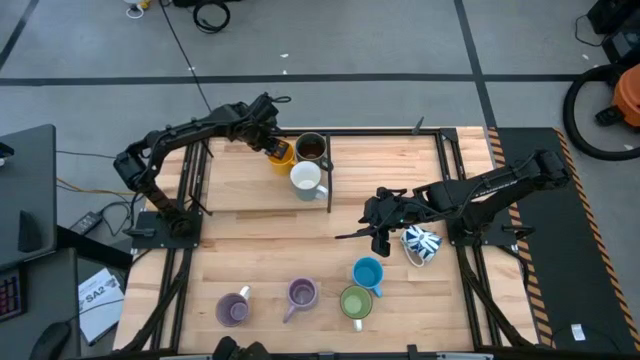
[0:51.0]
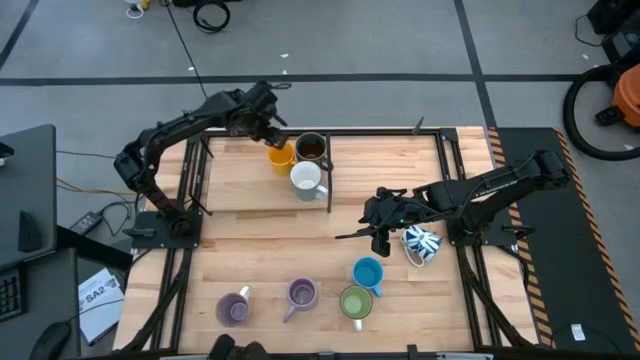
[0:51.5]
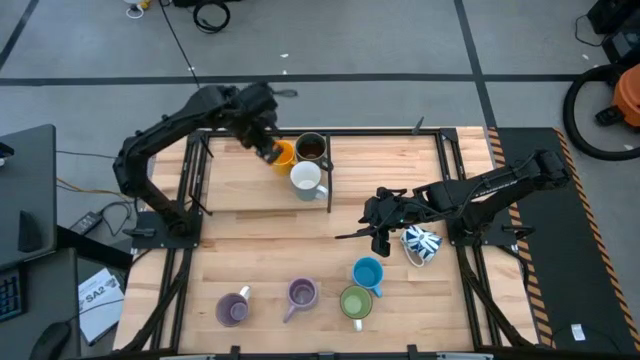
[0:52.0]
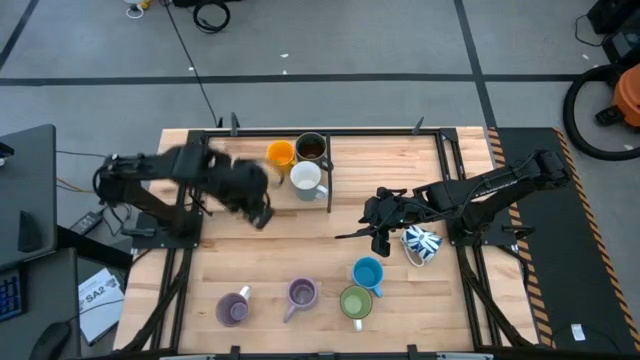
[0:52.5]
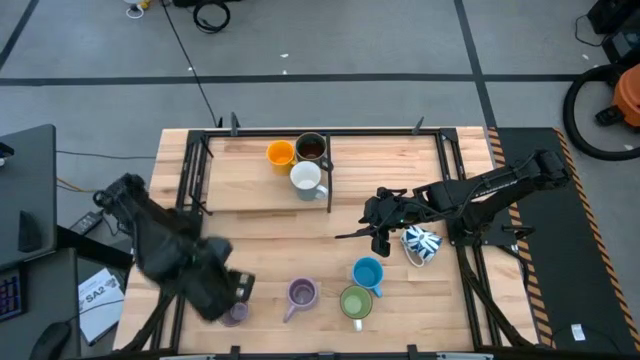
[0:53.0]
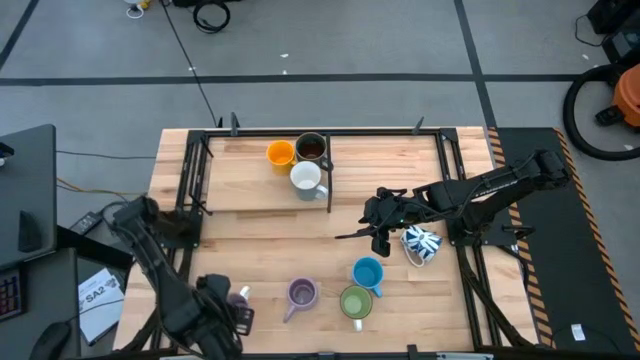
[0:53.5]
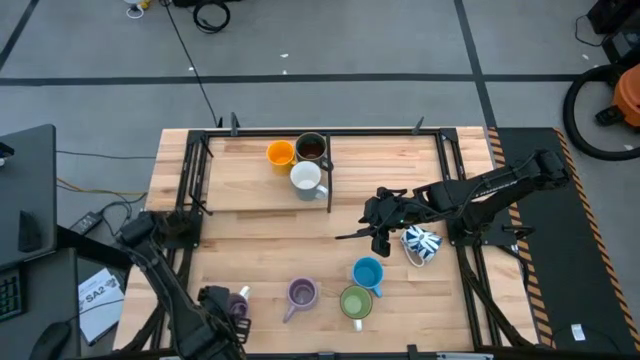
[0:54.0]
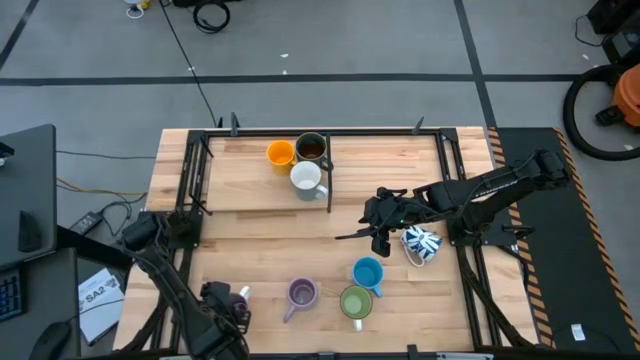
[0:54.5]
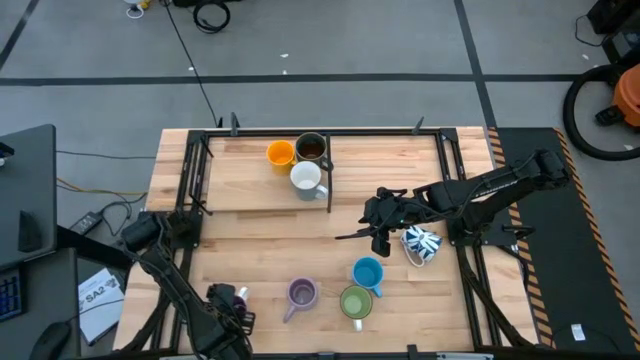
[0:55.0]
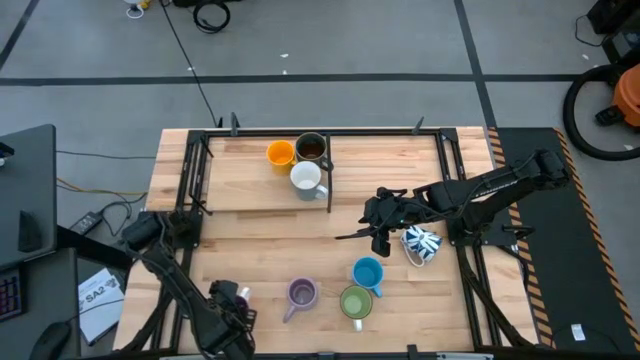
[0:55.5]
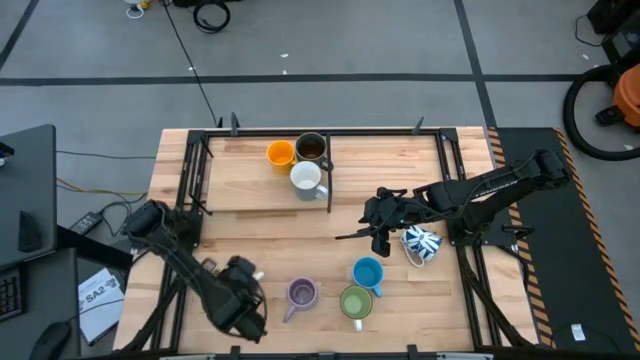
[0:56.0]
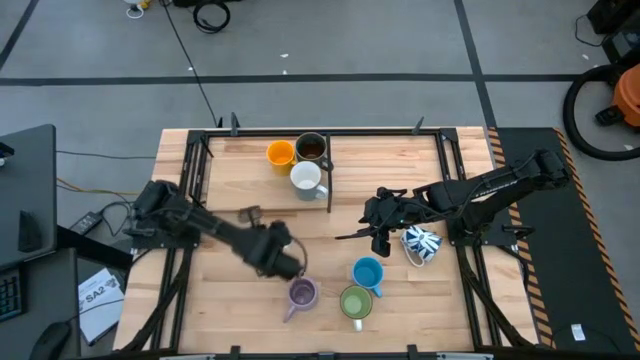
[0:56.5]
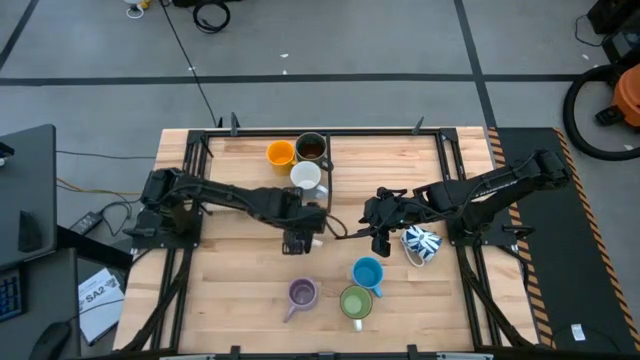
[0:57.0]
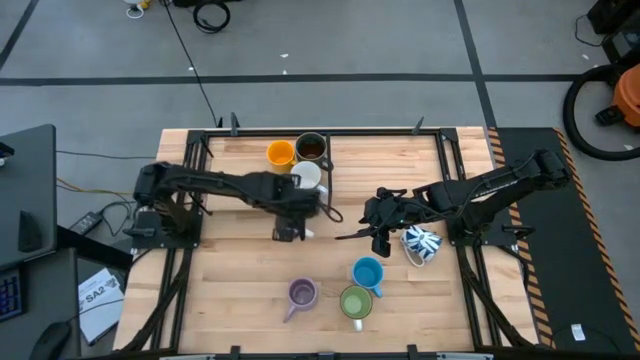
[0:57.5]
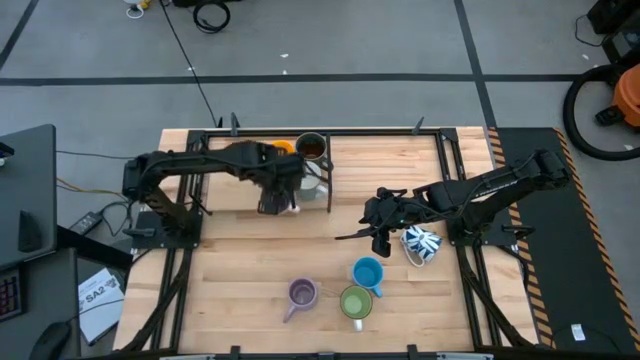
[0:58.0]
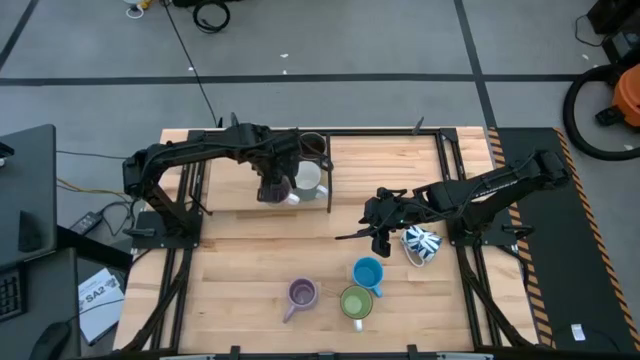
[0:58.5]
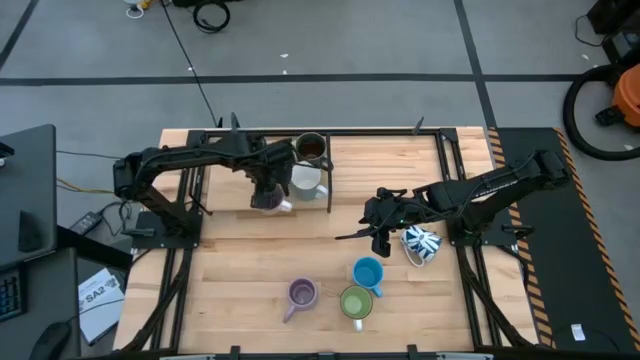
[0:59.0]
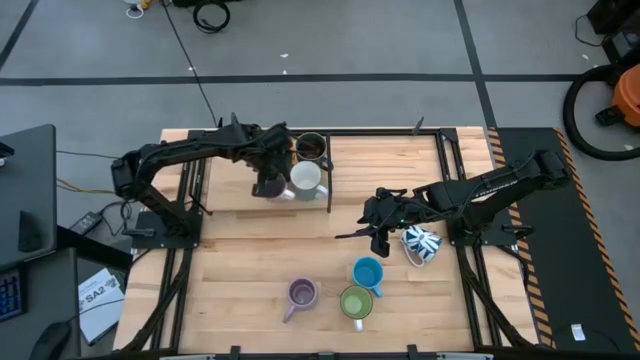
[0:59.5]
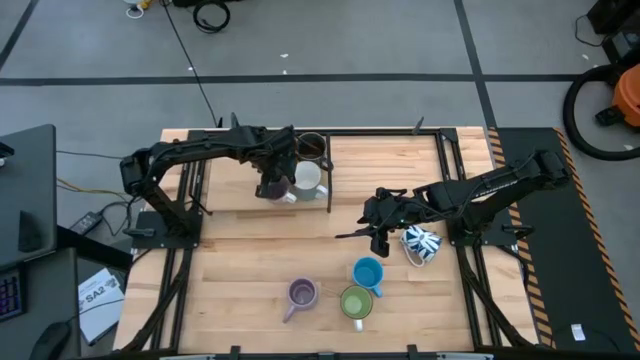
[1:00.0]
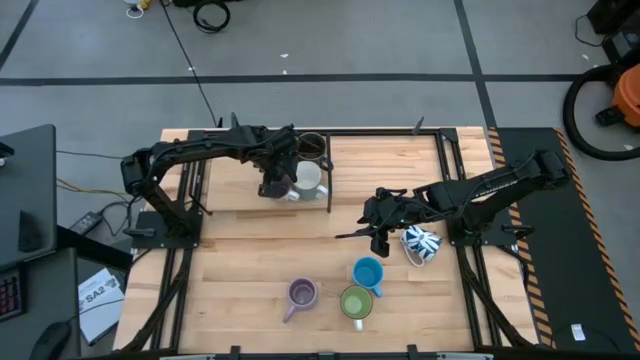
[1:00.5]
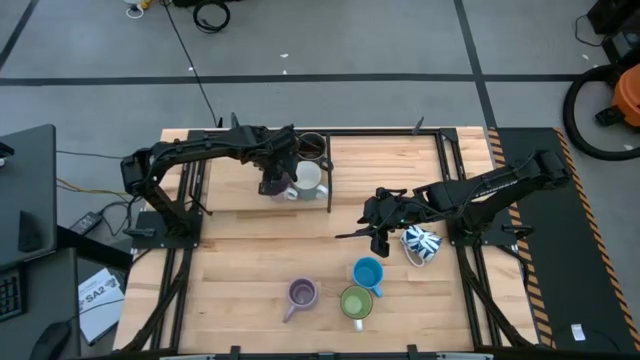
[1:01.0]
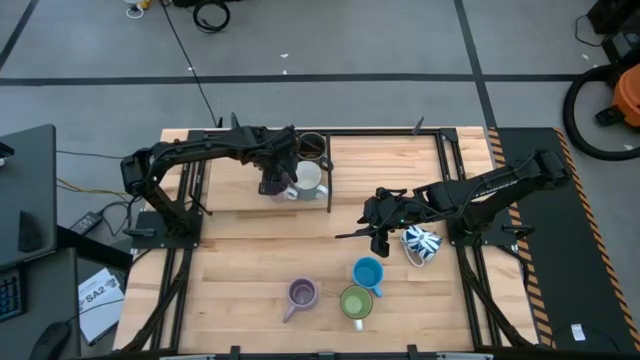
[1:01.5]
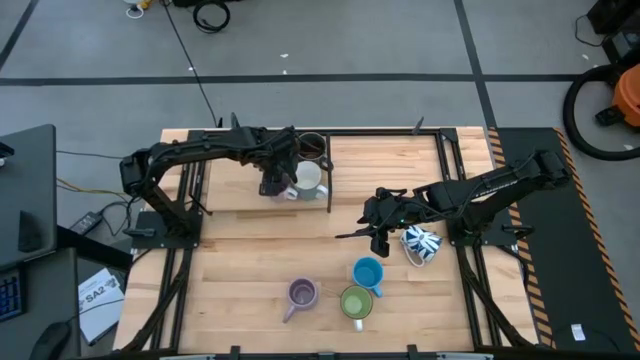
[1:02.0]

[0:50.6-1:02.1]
Task: Place coffee mugs
Put the purple mug on the left shelf

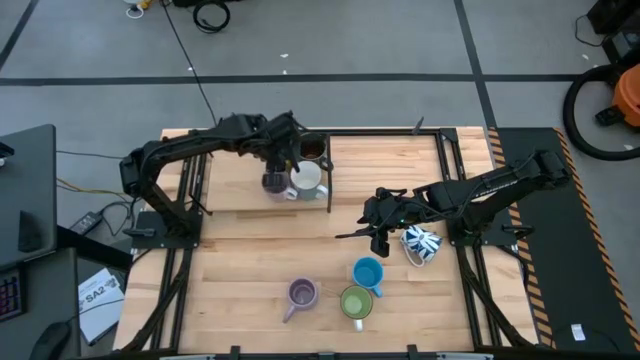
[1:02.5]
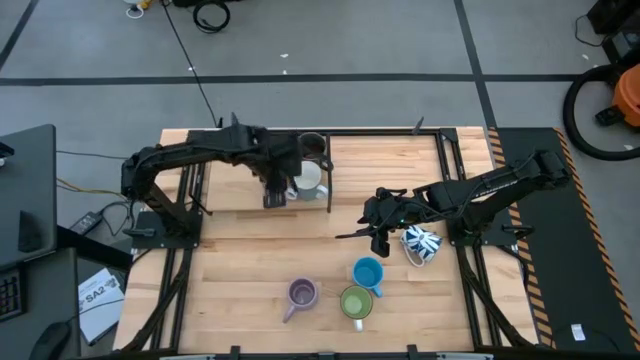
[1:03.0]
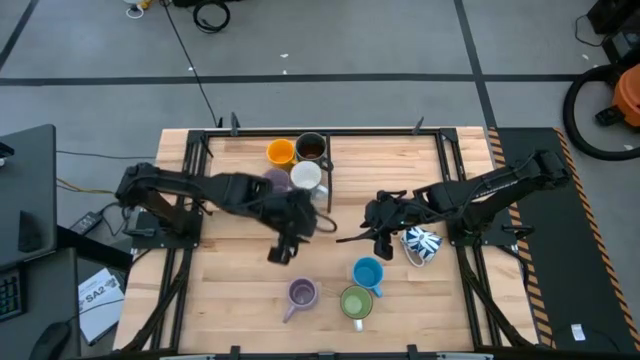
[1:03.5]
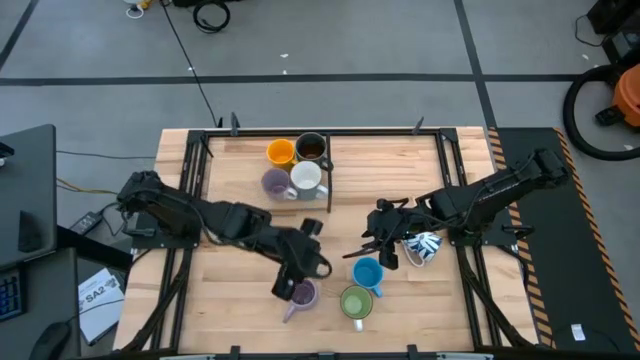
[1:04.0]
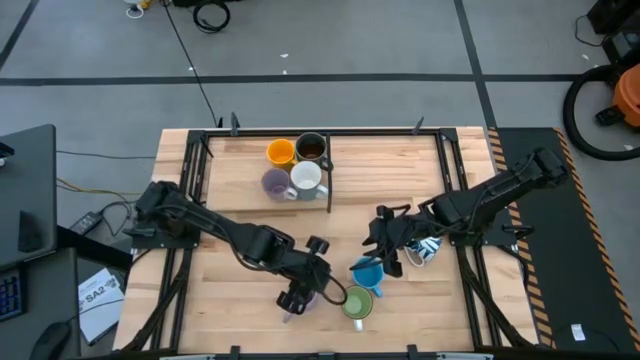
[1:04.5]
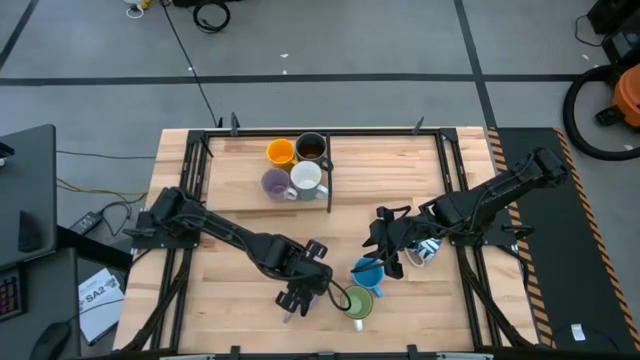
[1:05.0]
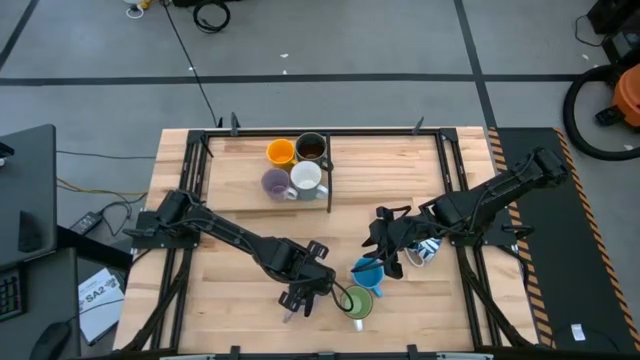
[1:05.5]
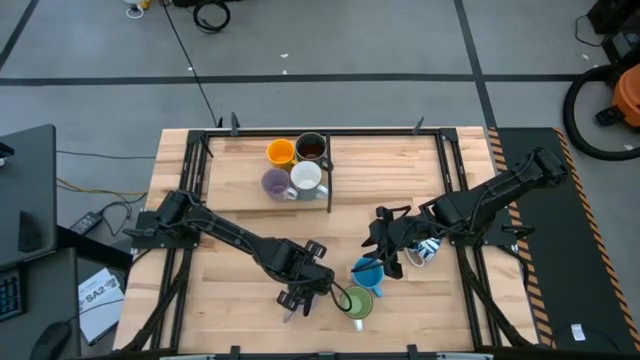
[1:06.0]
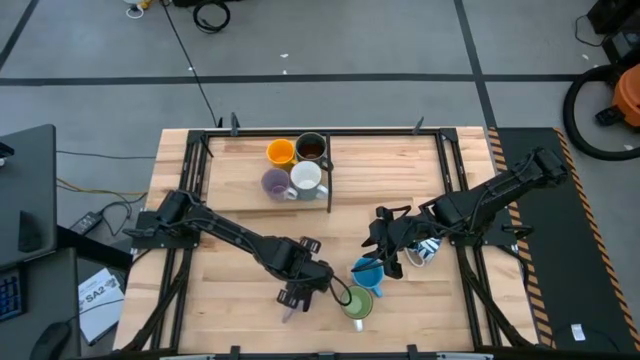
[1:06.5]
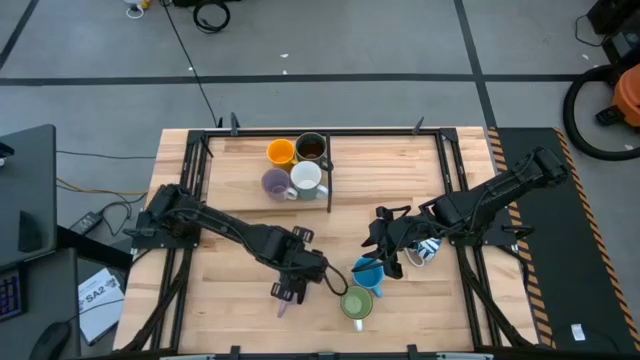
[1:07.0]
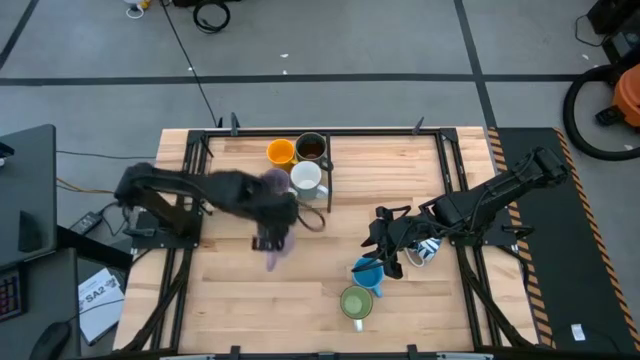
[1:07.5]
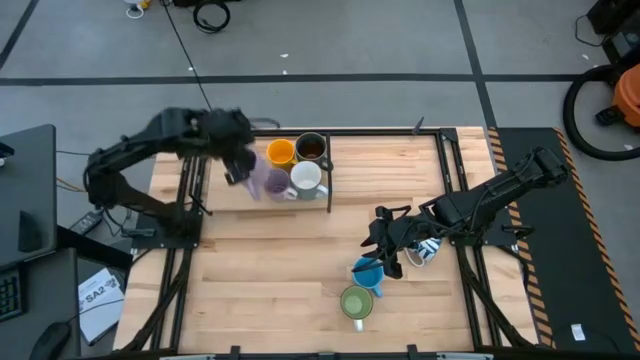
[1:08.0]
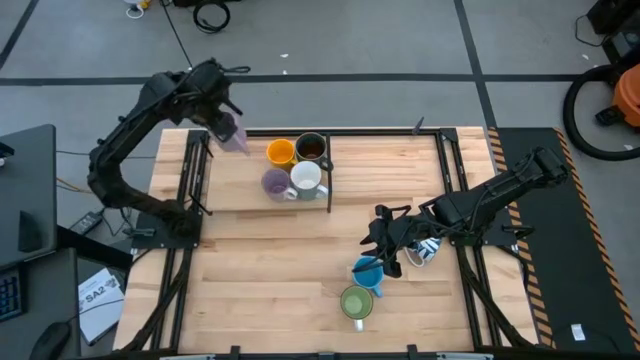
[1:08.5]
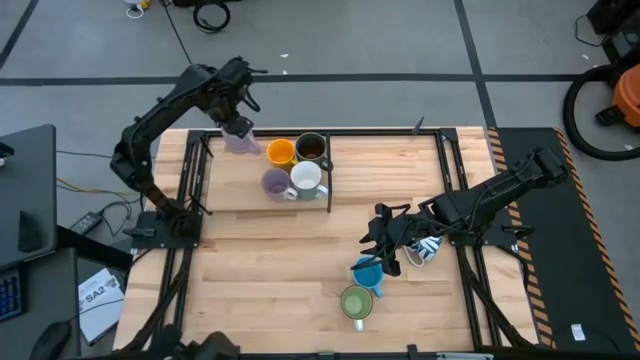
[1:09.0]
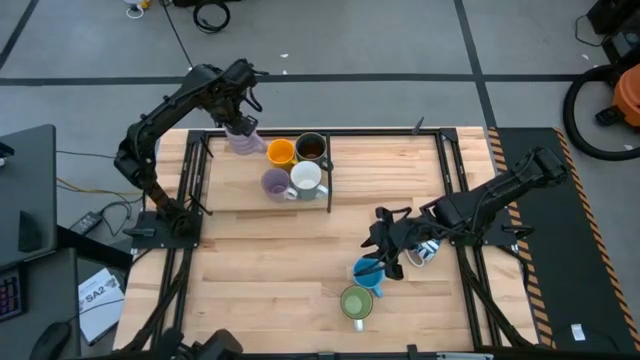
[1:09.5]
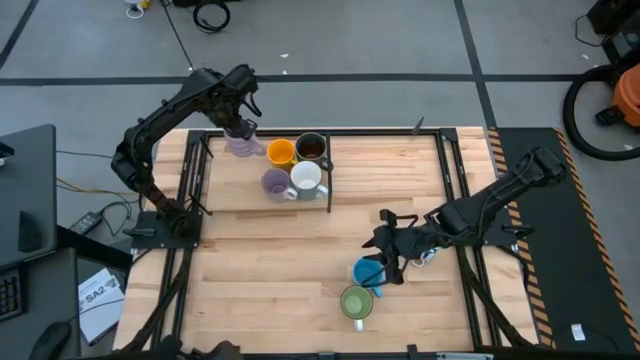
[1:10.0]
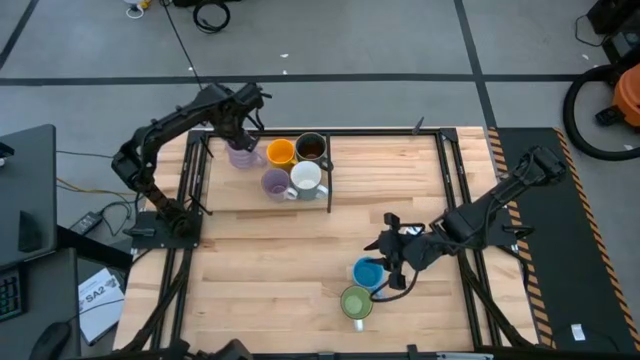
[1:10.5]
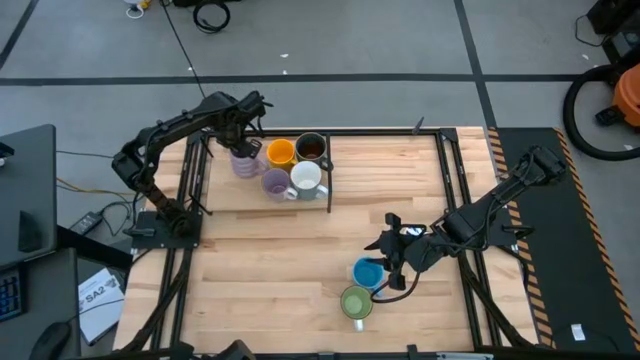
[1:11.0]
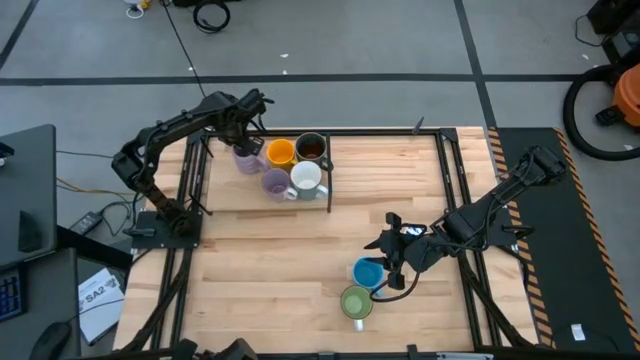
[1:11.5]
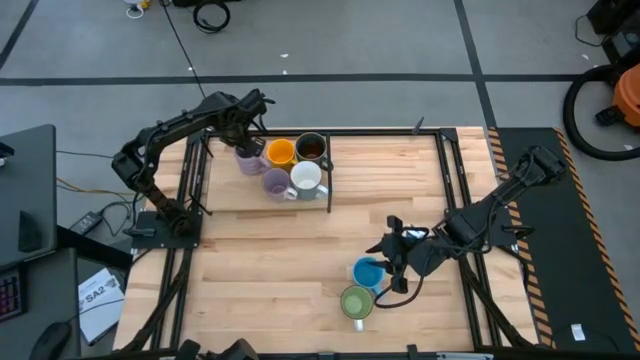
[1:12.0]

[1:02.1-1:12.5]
Put the purple mug on the shelf

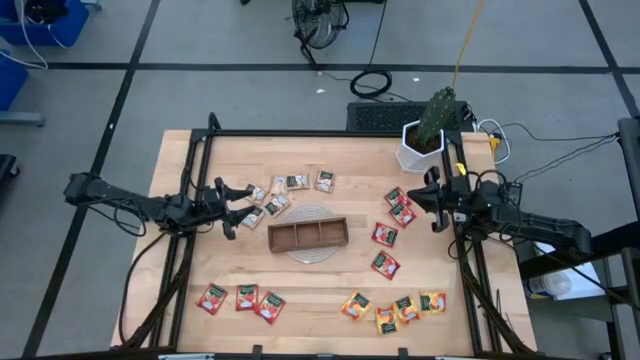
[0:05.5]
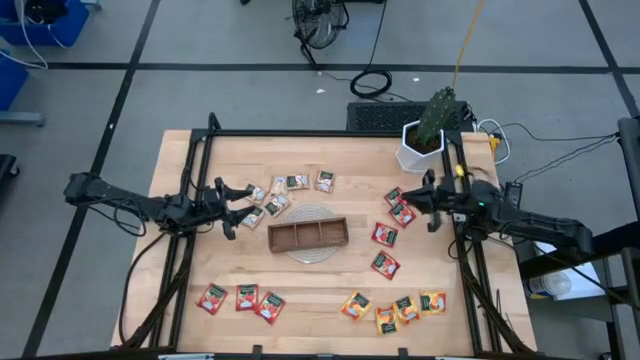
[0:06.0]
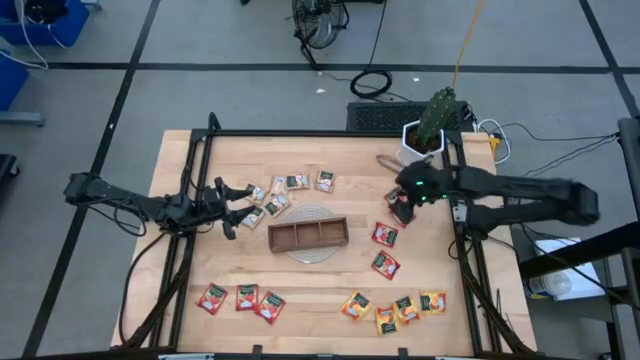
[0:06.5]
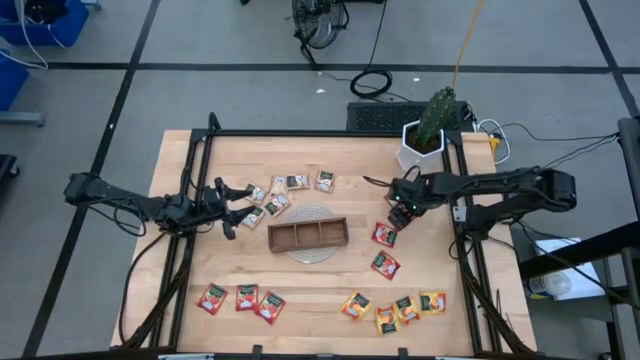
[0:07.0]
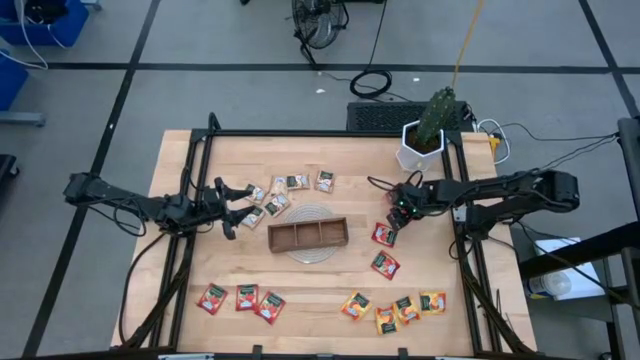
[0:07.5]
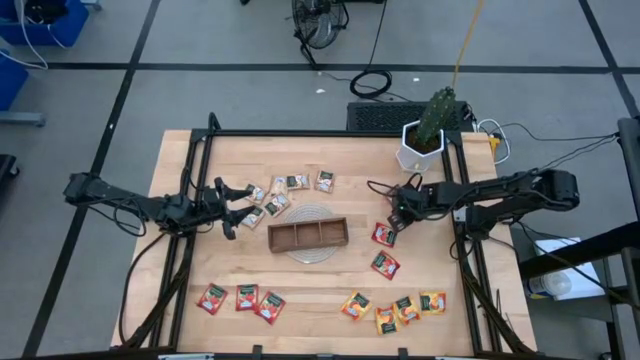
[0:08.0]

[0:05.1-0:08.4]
Task: Pick & Place Tea
Put the red tea bag into the right section of the wood organizer
